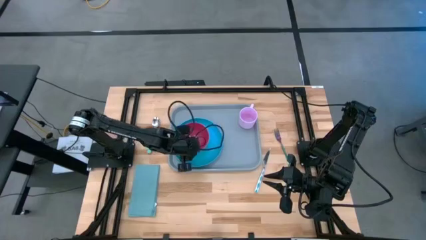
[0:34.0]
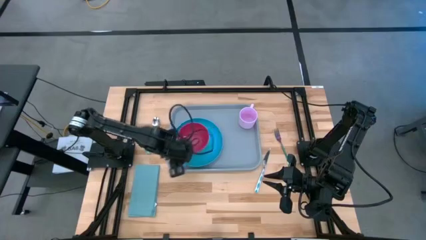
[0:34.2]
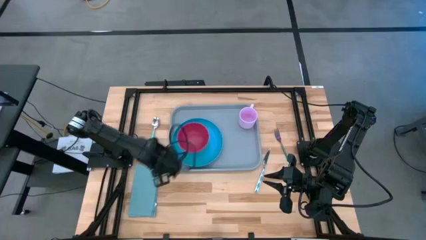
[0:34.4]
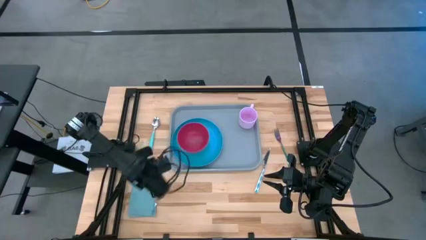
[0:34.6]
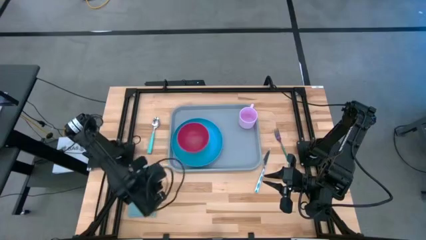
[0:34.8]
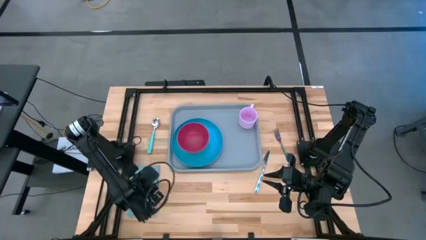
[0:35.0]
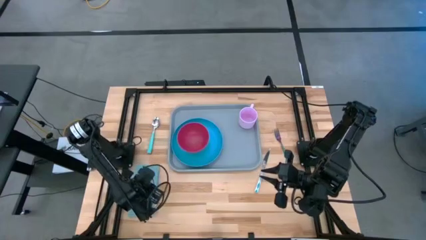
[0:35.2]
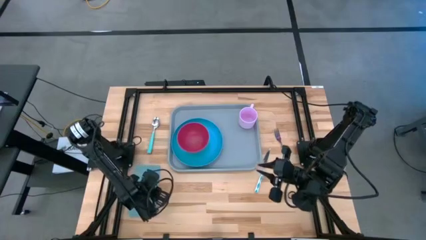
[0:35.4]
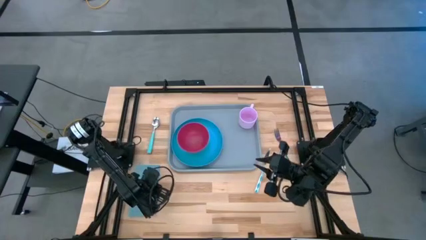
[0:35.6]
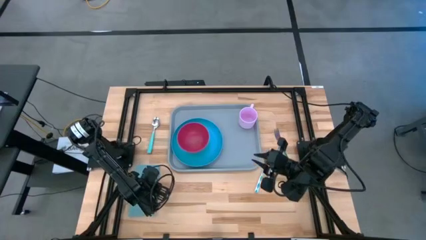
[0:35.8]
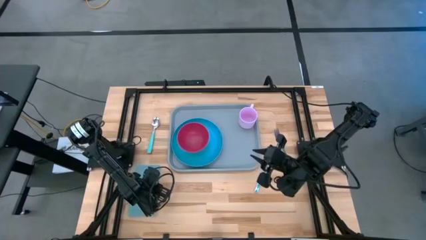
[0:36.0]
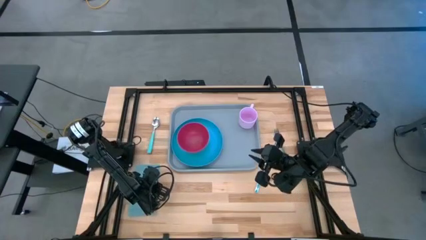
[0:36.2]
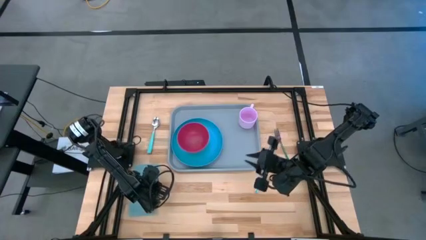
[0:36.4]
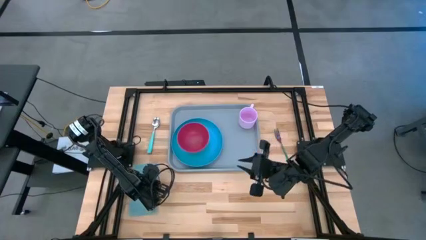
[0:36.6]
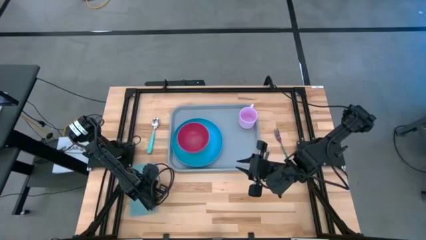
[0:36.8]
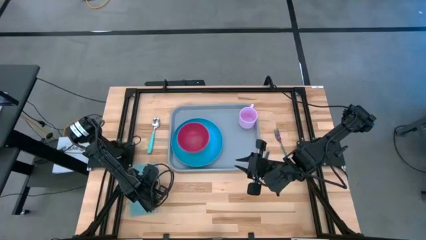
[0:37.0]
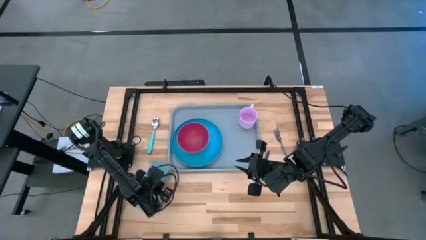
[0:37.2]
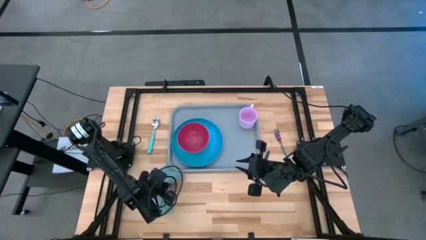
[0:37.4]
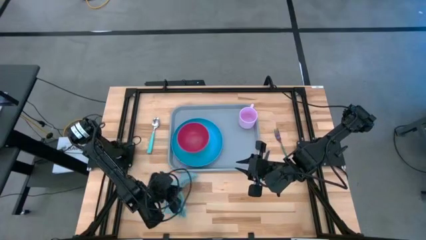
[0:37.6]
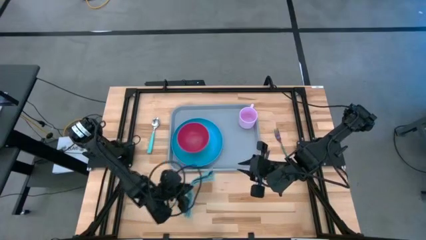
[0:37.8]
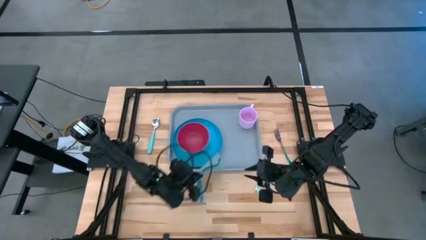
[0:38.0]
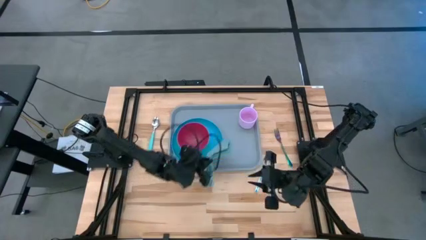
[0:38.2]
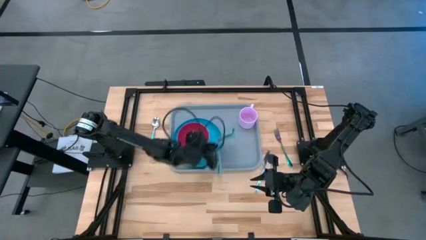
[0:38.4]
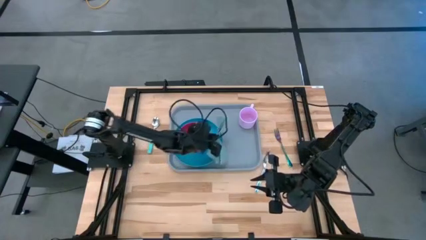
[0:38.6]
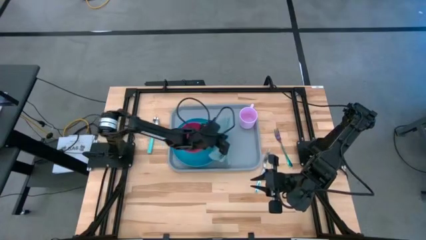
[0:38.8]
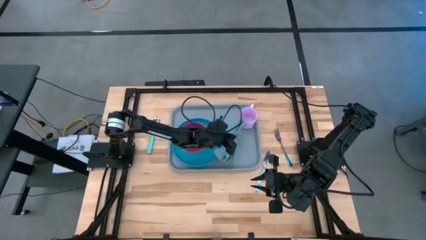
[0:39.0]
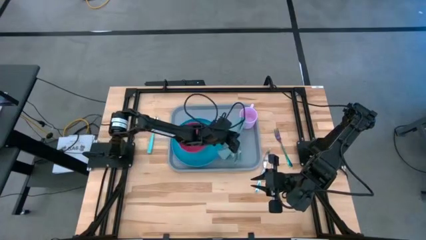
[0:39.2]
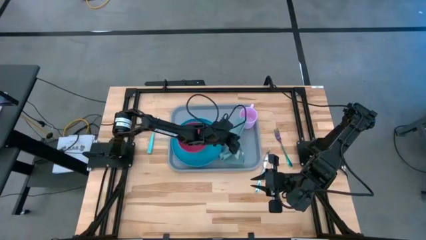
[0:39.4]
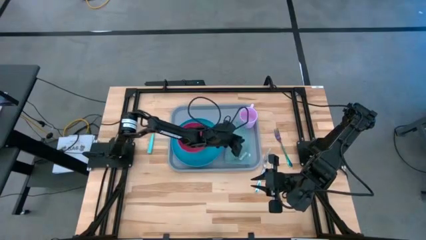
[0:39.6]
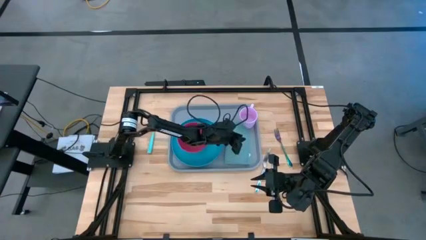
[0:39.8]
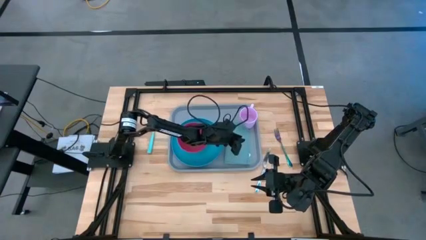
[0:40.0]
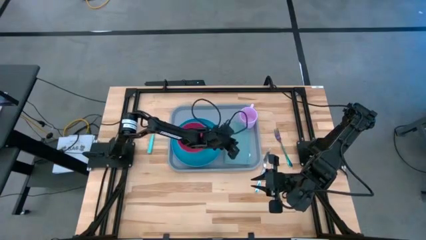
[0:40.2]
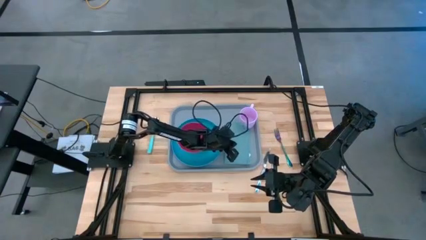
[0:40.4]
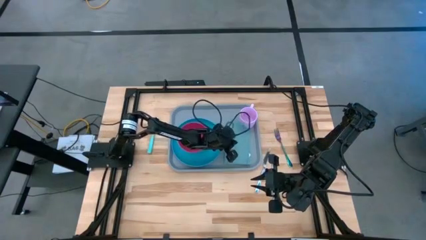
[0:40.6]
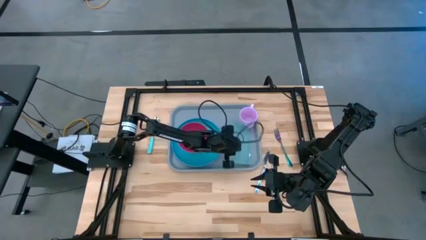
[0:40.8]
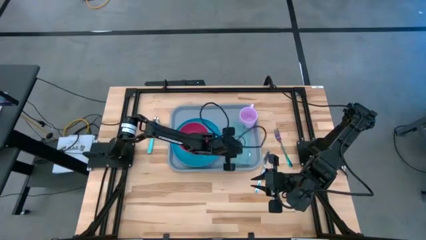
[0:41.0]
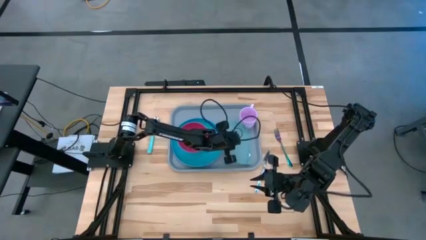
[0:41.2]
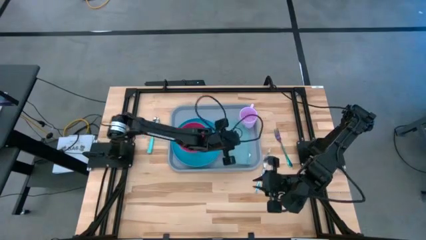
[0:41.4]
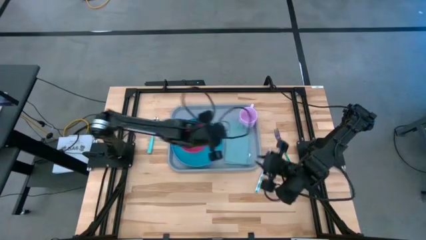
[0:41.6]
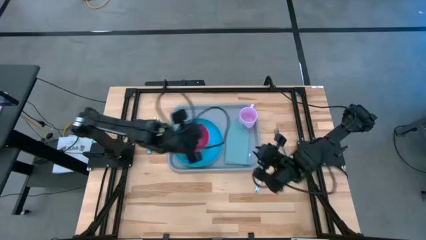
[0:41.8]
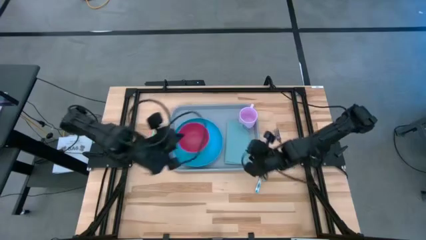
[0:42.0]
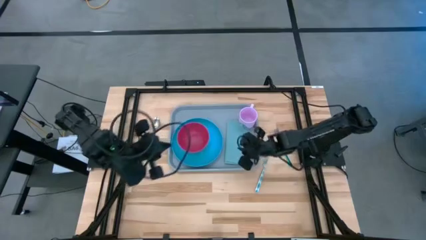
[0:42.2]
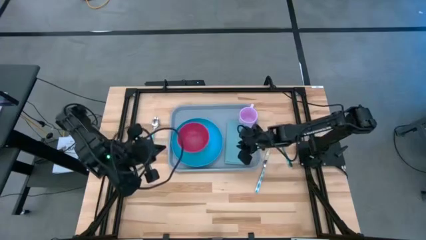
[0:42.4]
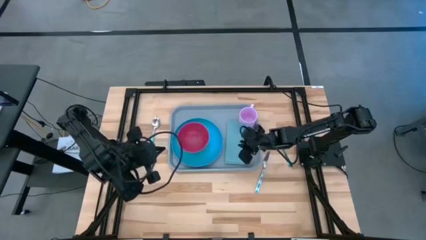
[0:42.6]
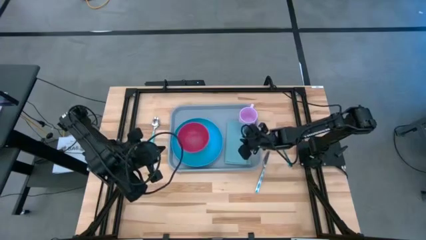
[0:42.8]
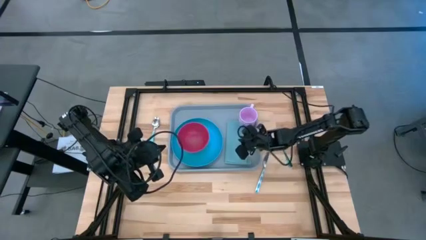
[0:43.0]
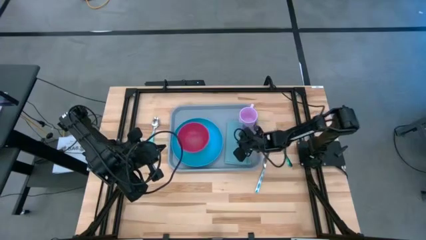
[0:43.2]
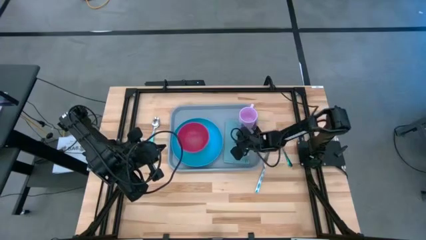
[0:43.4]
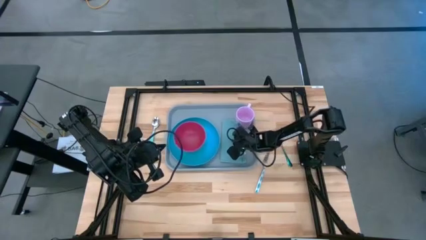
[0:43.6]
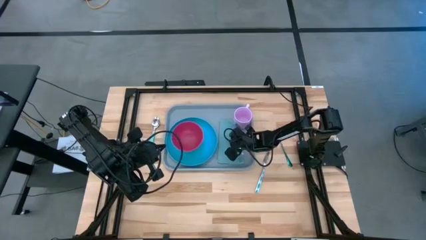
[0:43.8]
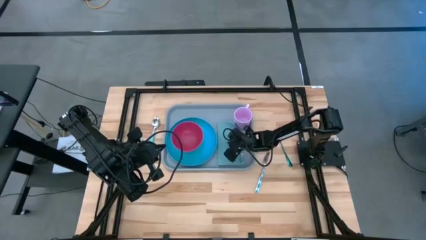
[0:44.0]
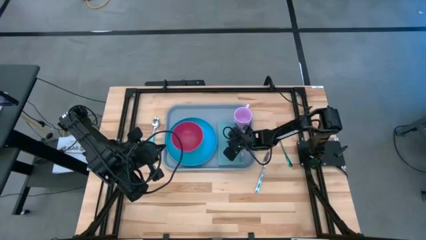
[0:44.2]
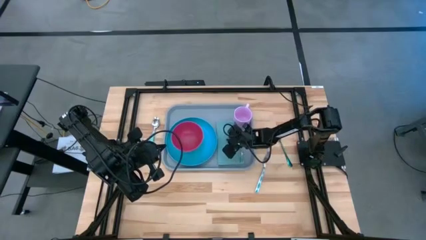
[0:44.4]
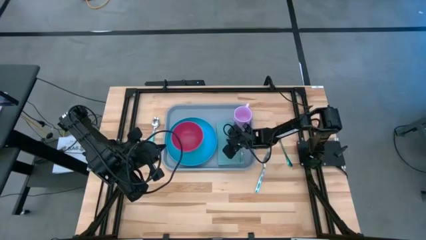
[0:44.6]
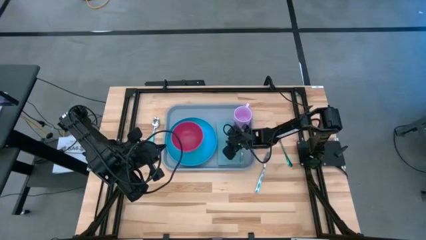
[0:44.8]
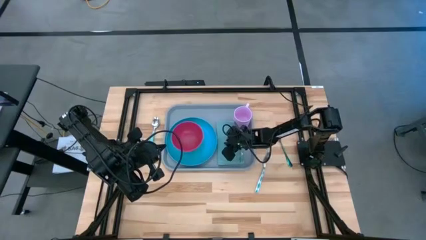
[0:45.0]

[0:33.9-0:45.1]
Task: Set up tray
Put the blue napkin on the gray tray to the left of the blue plate

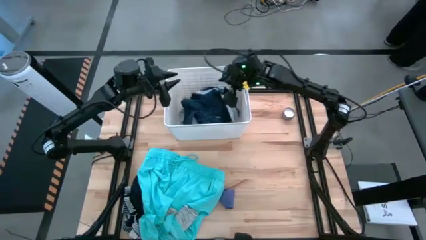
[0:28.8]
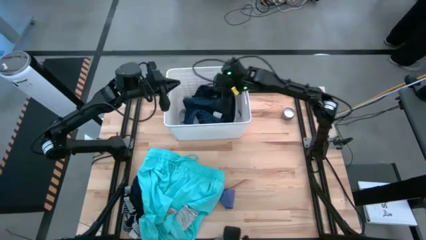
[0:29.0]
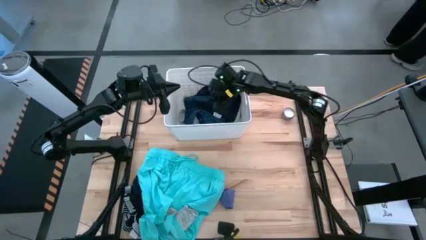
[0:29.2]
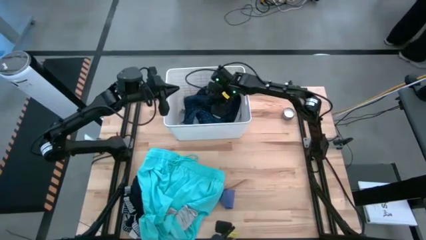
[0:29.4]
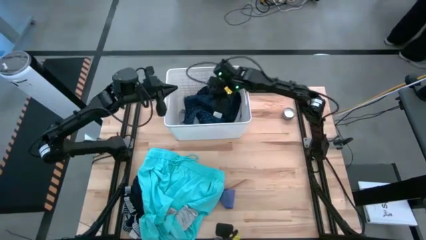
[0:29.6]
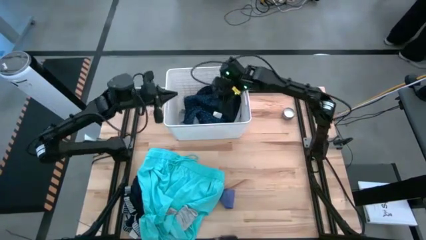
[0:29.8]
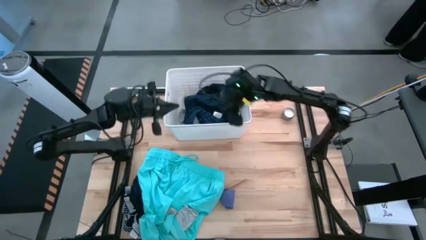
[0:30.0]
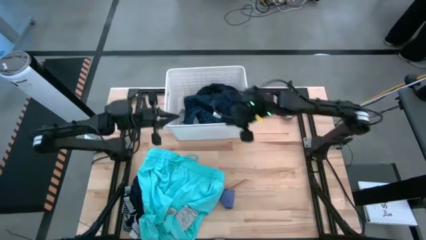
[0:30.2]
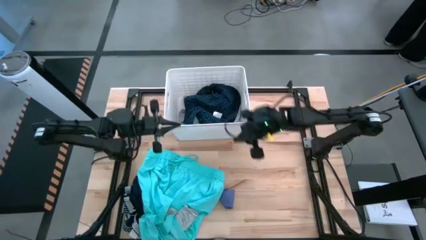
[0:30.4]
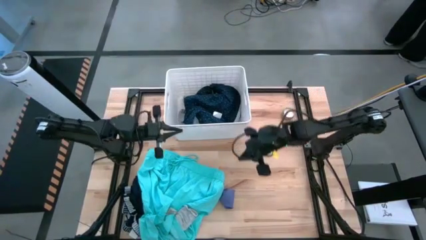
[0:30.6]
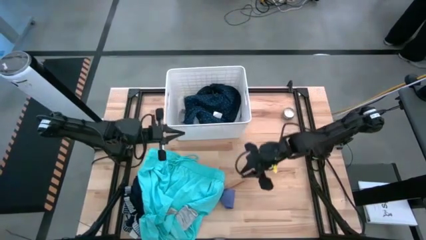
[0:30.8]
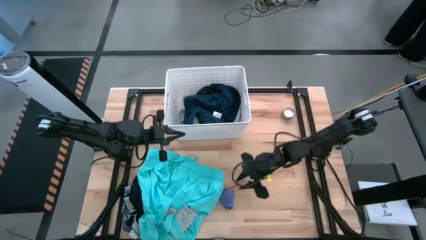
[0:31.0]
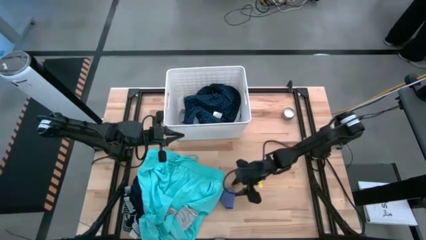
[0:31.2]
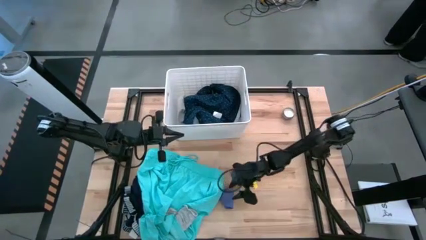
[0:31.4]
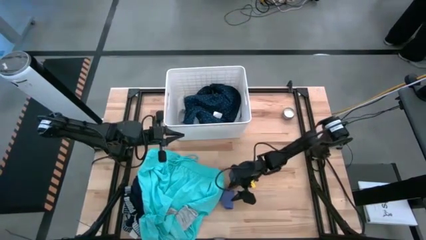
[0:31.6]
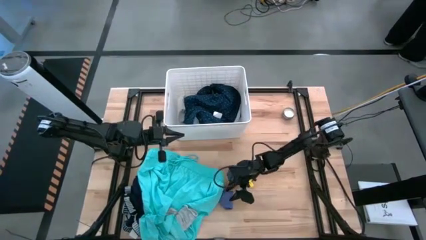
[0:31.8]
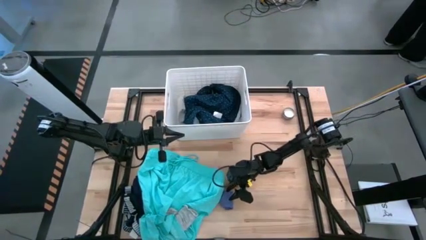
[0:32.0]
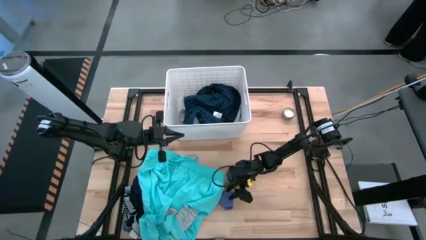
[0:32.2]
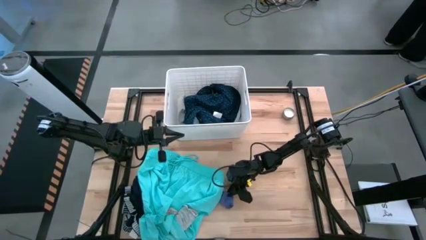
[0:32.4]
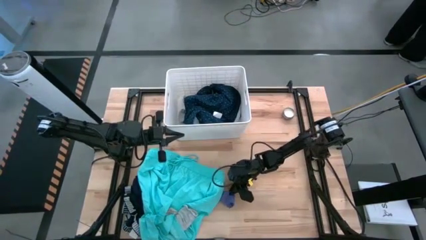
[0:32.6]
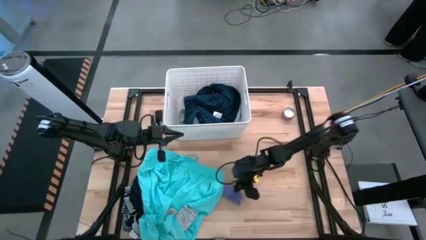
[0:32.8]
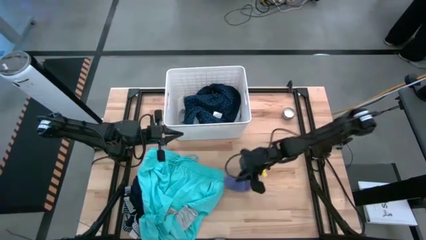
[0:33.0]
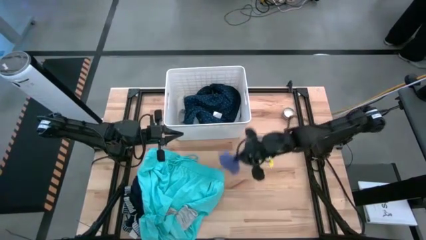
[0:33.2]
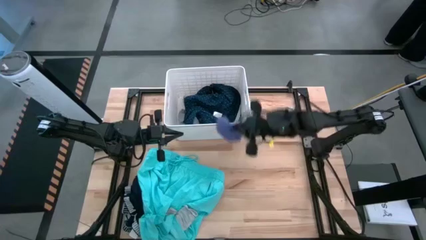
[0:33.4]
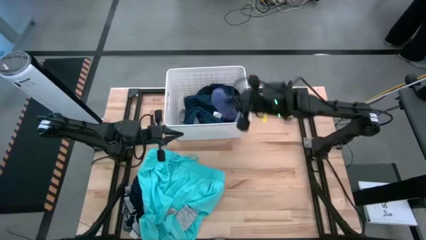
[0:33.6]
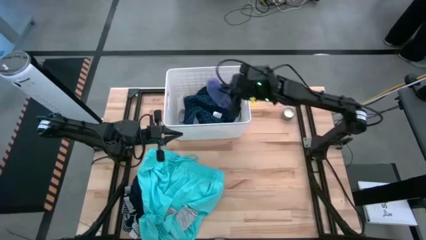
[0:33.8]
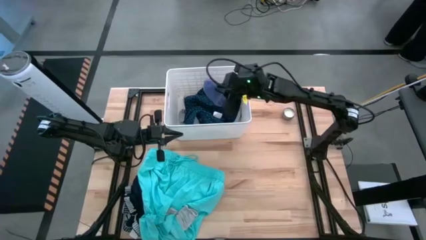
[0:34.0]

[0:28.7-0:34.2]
Task: Sort clothes
Put the purple sock into the white bin
